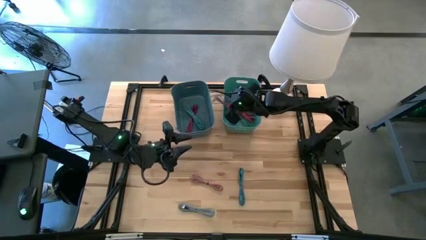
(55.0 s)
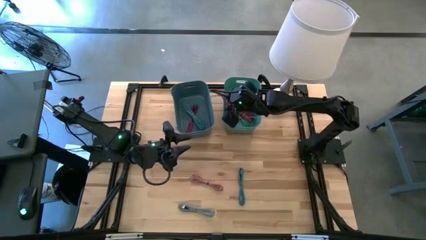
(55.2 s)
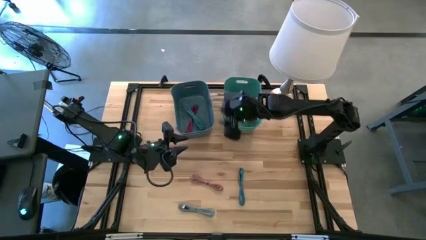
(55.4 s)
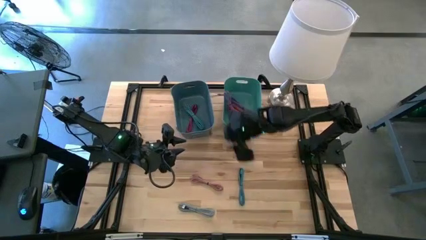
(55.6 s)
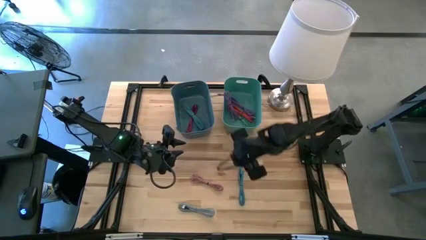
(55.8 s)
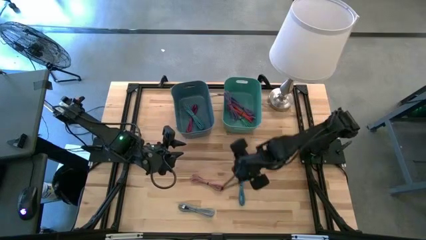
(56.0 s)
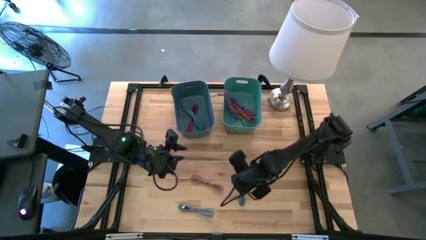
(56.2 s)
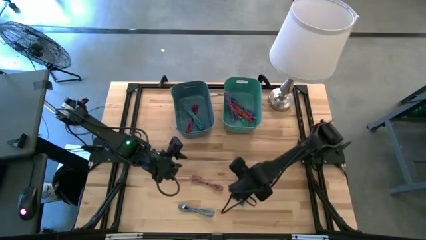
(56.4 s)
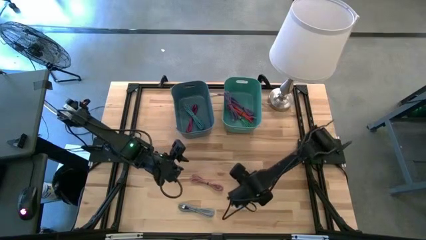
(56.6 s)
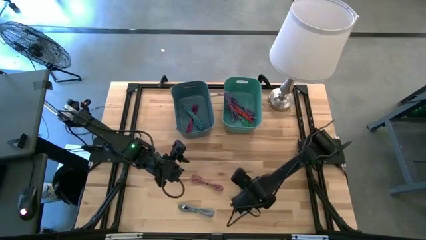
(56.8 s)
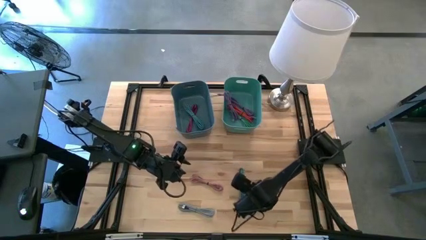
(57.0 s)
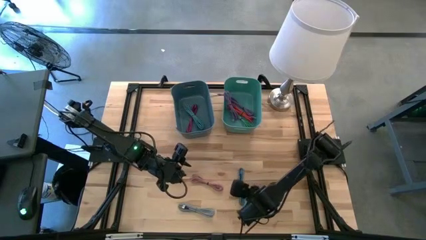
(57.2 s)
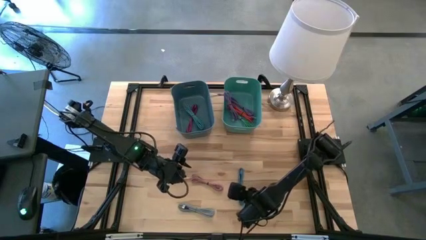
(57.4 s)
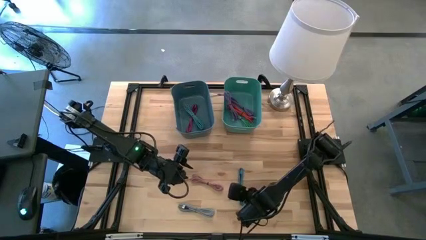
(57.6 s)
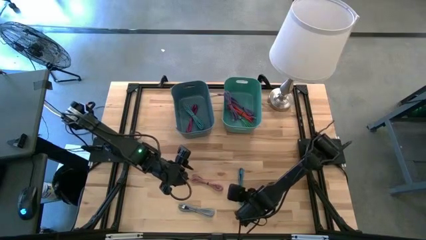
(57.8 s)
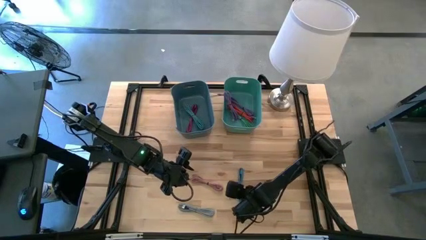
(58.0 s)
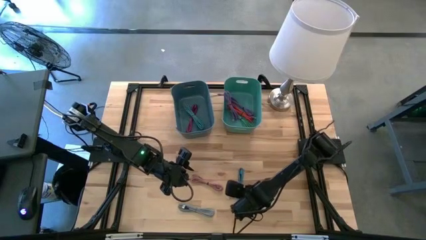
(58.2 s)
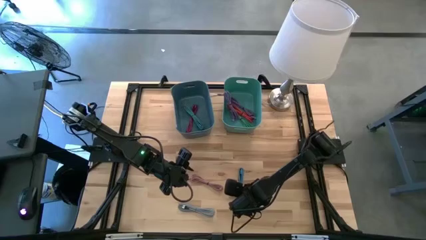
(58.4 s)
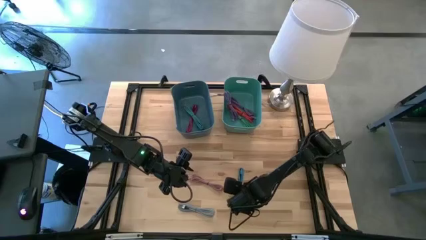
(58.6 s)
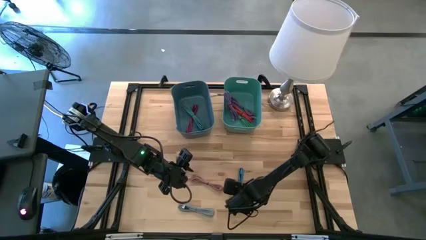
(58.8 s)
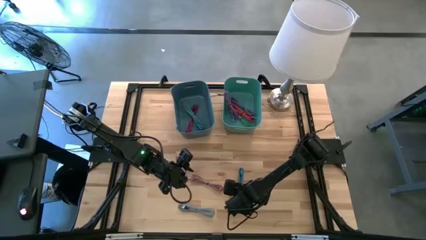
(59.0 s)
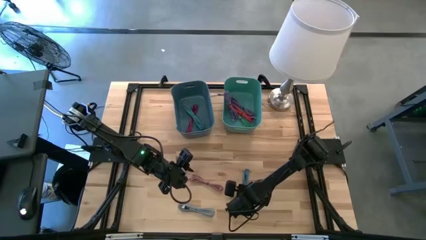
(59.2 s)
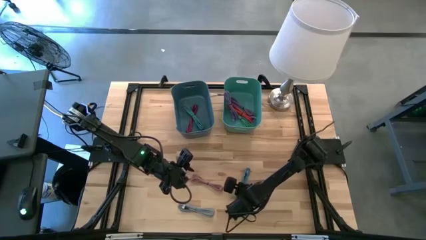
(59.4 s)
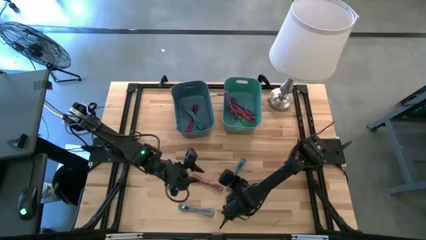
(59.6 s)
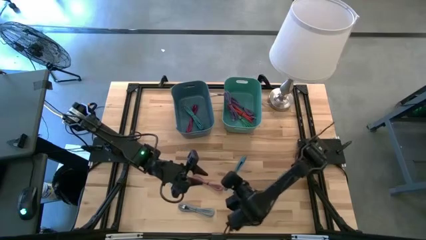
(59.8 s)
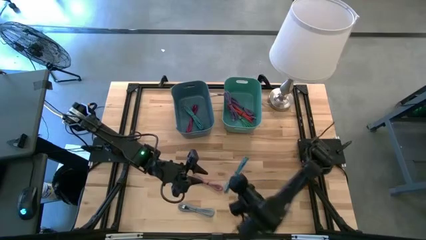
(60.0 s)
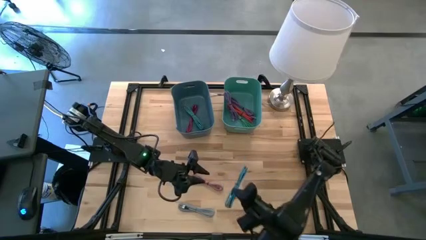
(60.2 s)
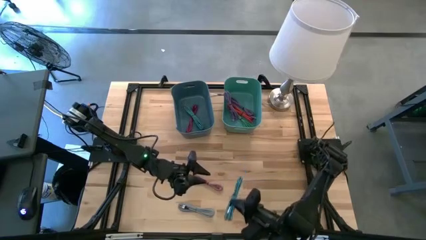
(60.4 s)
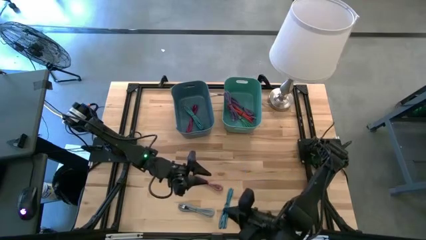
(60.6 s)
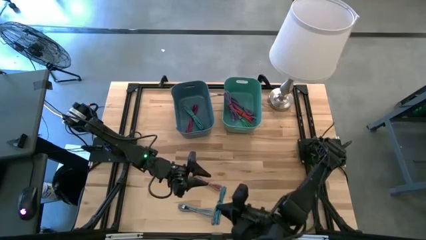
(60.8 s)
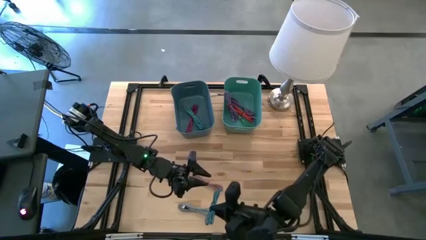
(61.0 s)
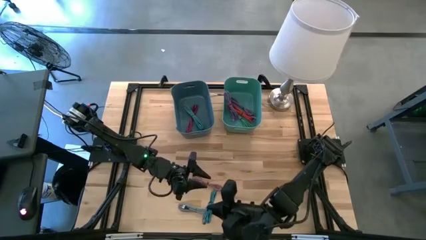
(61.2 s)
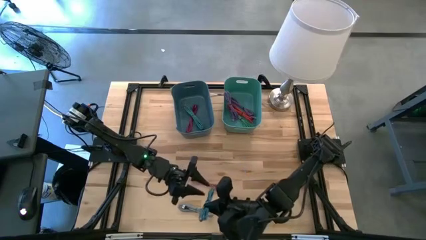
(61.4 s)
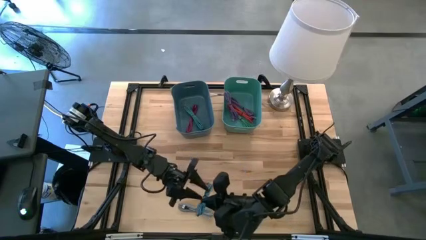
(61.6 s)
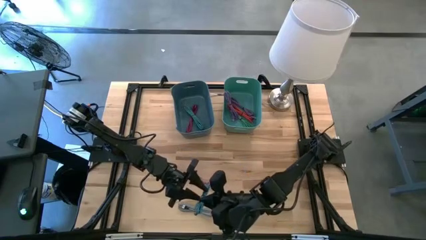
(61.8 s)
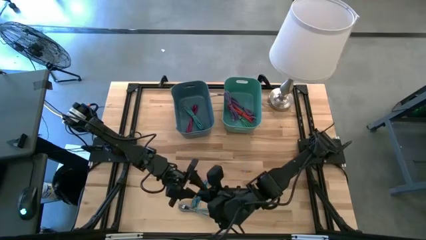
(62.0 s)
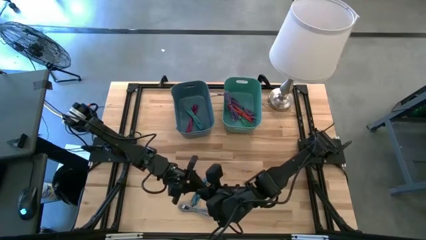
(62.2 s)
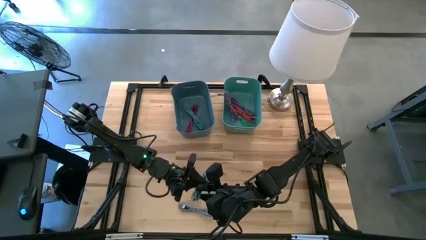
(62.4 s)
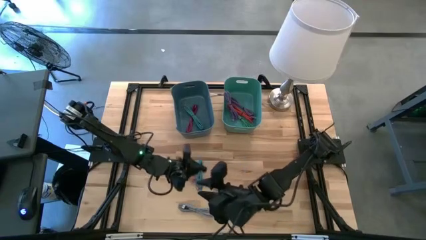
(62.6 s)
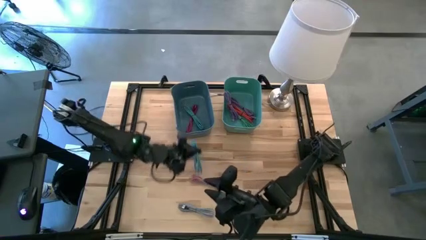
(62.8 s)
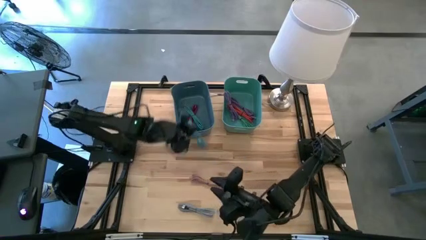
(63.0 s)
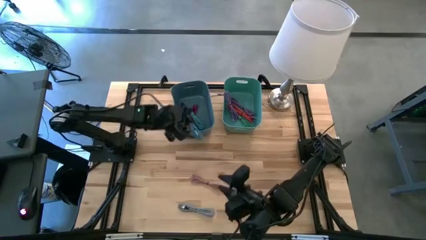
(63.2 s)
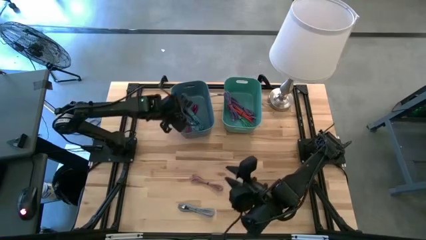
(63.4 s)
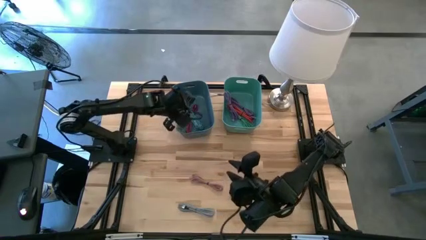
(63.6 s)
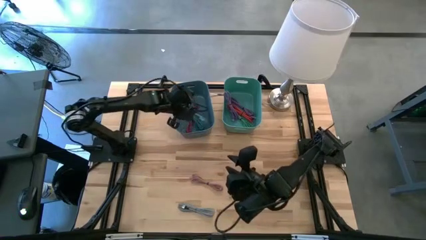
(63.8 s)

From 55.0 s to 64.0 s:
Task: Pick & Place USB Port
Put the black and blue charger cable into the blue bin

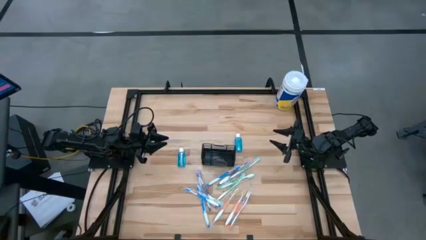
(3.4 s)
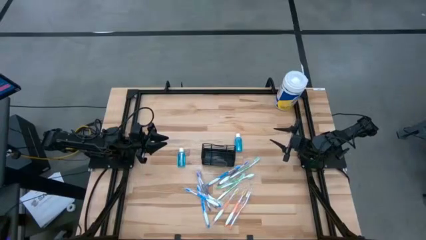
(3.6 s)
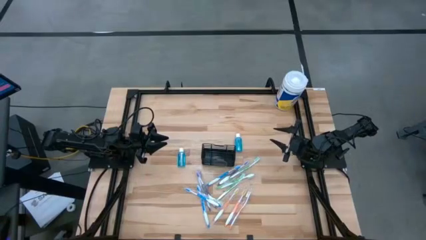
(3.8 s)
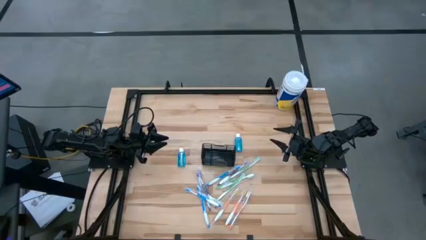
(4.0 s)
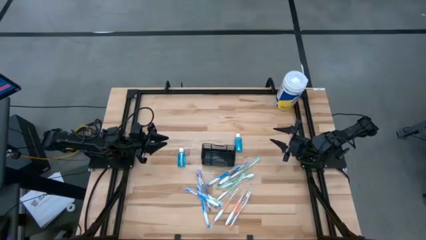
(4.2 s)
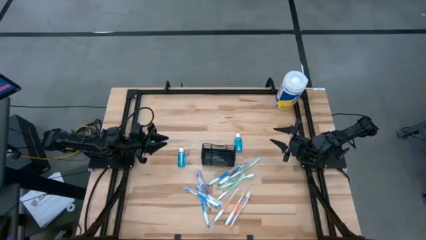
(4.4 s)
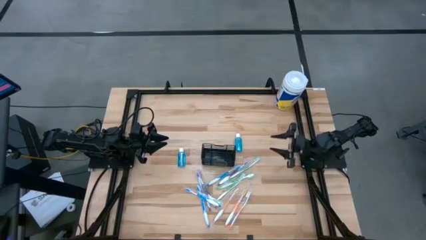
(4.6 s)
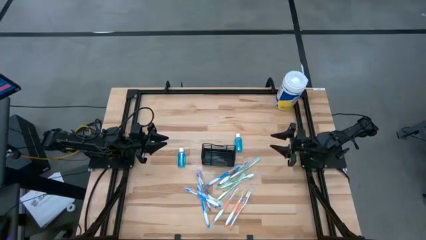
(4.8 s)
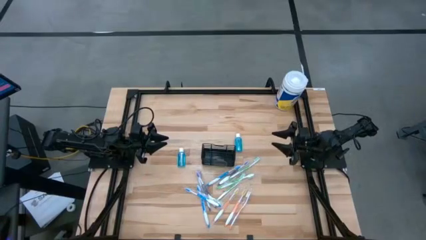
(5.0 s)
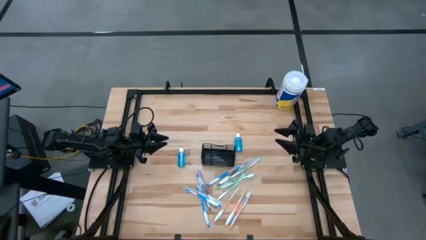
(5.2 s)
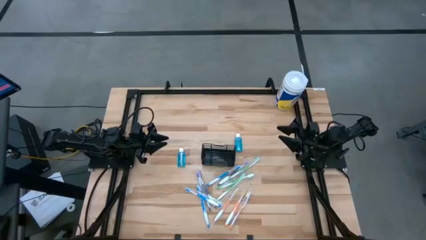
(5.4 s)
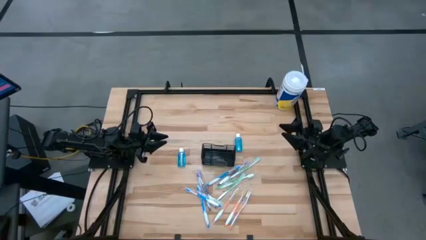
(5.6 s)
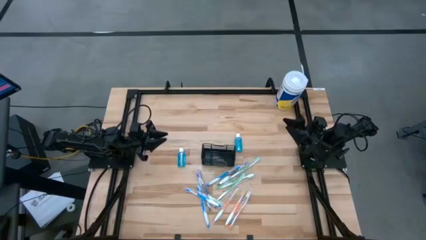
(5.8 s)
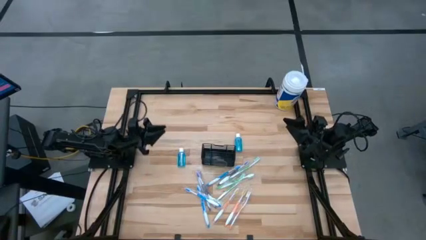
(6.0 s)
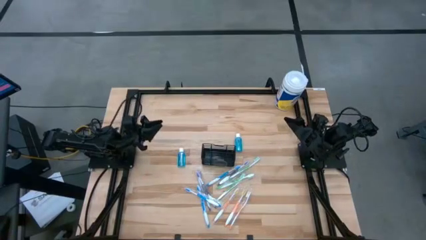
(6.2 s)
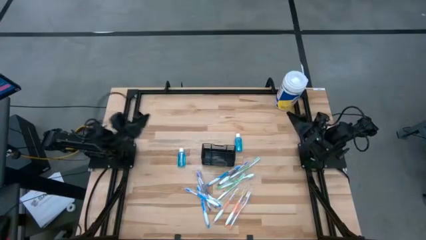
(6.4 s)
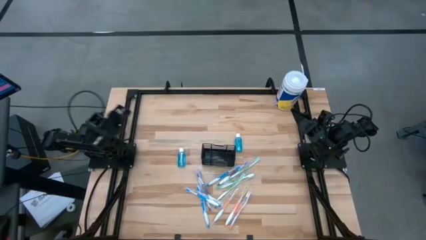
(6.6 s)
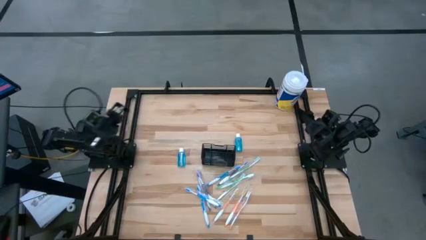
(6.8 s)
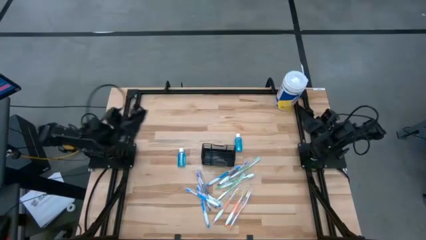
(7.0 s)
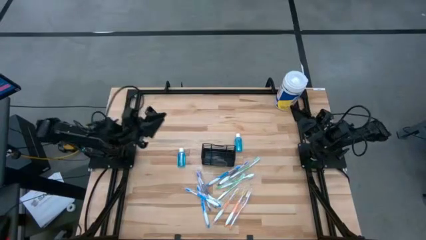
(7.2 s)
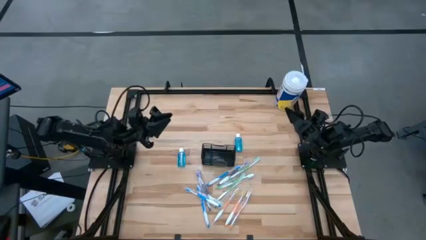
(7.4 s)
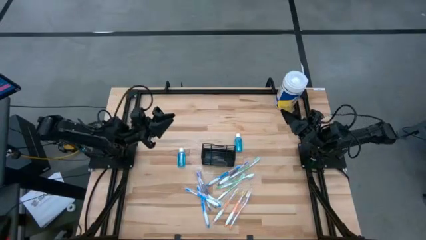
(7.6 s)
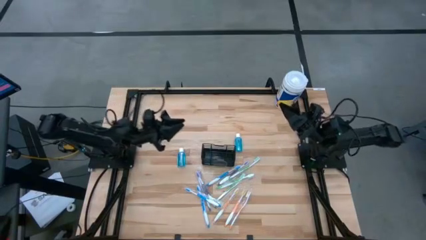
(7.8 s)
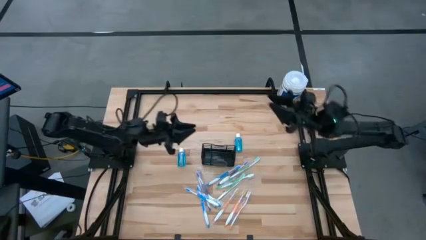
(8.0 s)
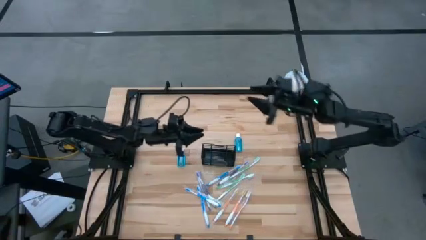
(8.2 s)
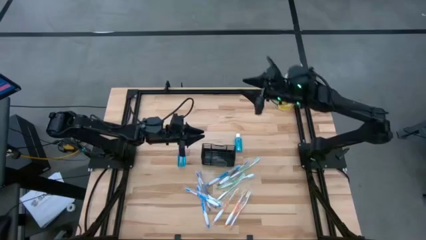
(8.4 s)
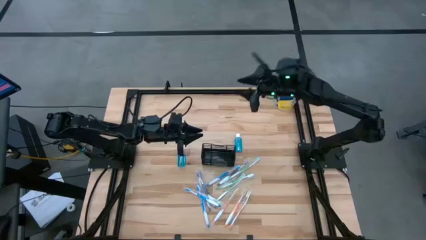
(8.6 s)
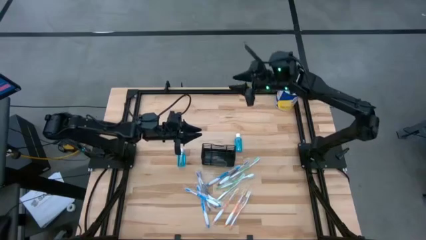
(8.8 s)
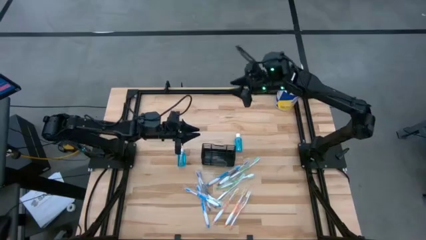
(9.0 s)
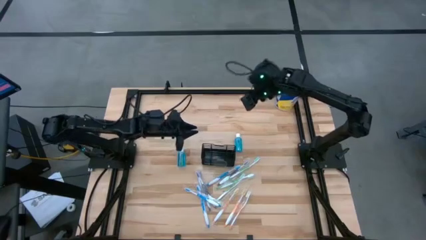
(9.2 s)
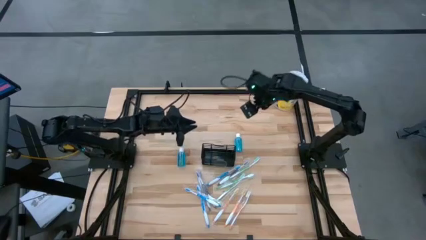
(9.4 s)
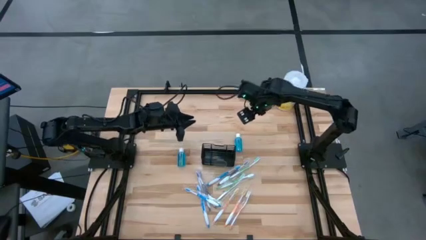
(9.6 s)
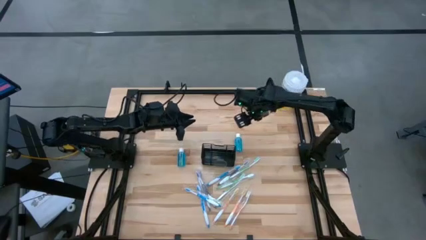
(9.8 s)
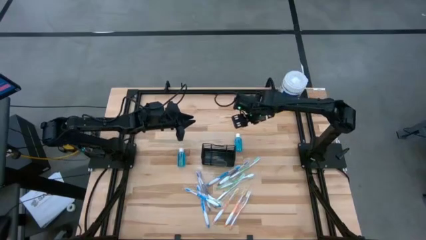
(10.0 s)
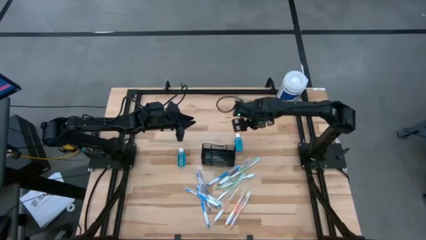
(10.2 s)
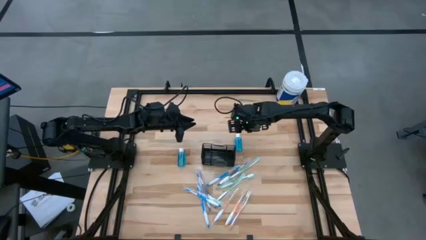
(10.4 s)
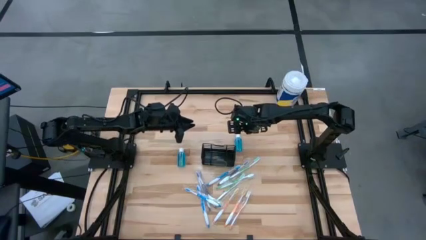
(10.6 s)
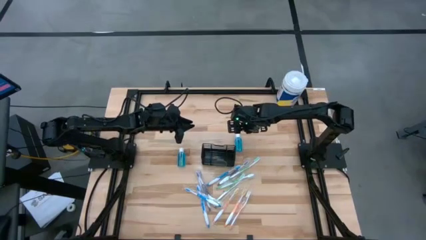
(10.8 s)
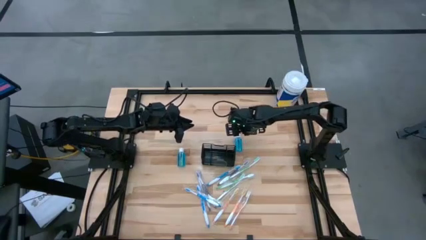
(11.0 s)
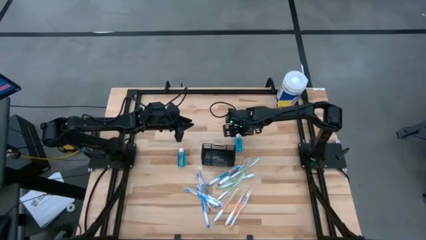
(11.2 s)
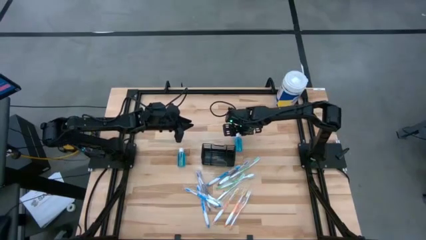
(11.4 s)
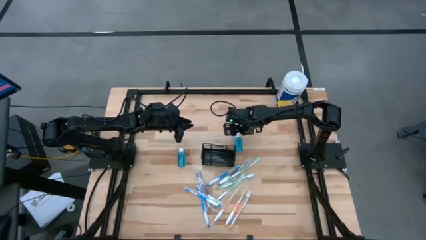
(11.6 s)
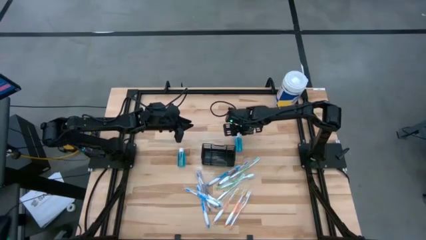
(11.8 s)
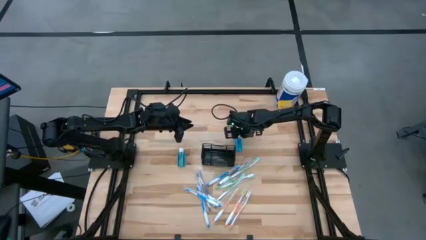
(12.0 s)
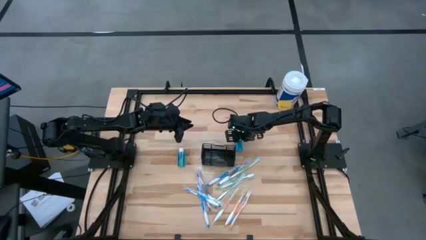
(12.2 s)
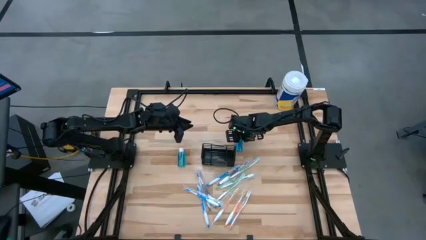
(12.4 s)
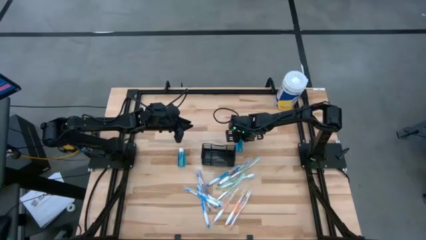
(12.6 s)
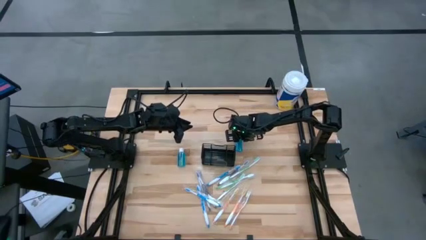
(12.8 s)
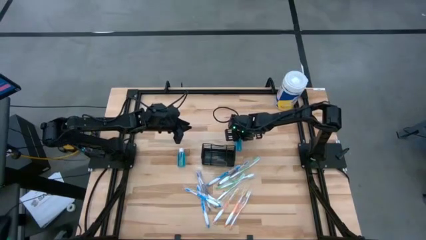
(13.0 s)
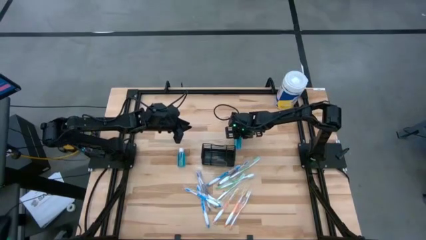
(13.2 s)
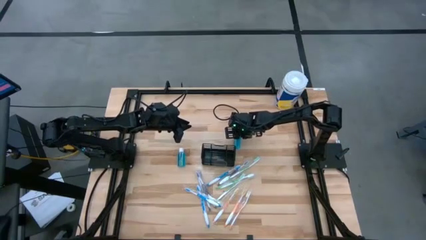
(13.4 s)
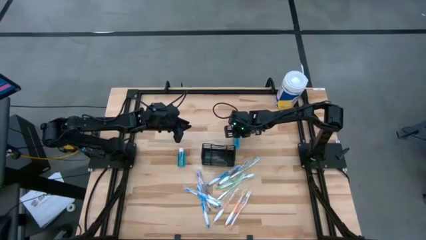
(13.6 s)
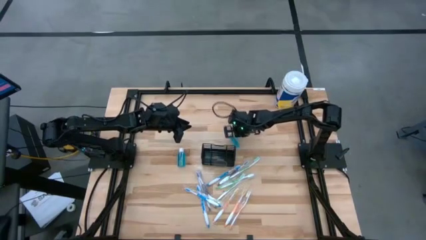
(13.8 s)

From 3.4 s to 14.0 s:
Task: Pick & Place toothbrushing station
Put the blue mouthwash into the black wire organizer
